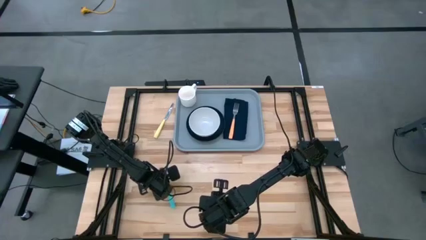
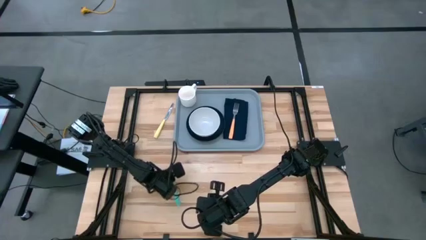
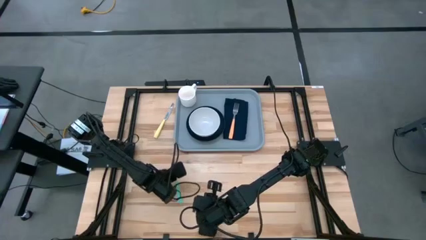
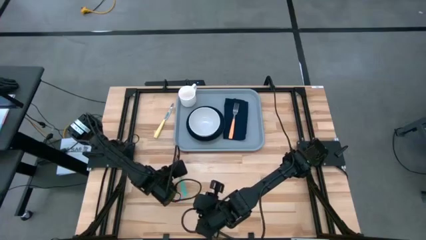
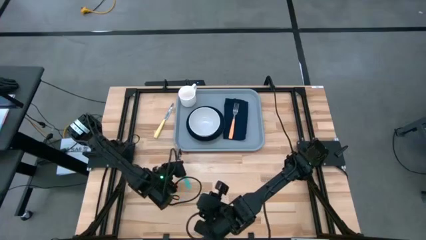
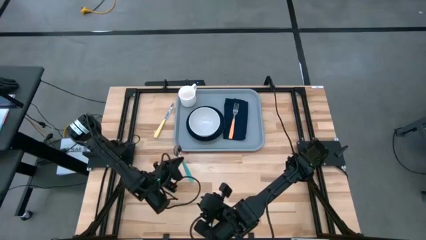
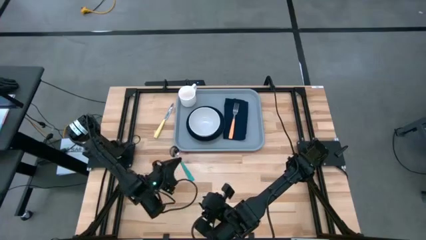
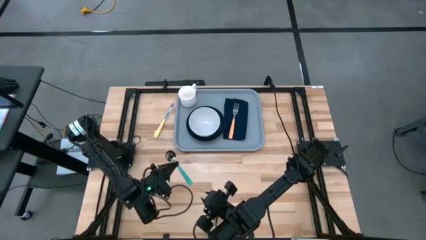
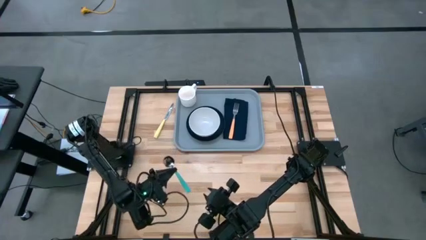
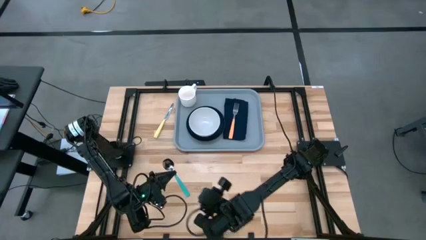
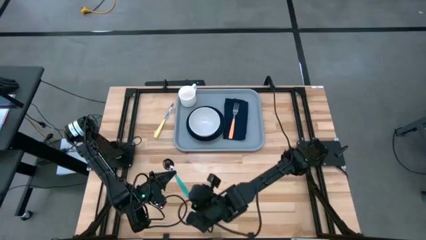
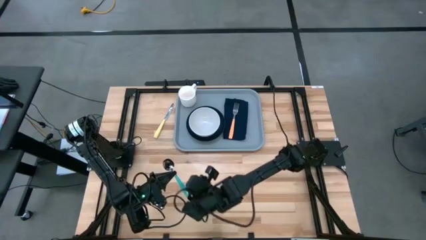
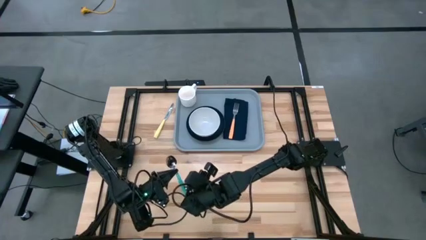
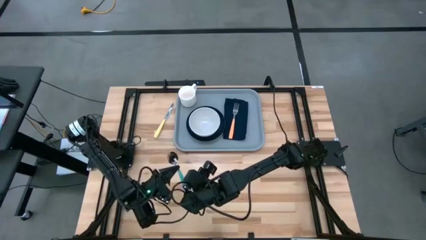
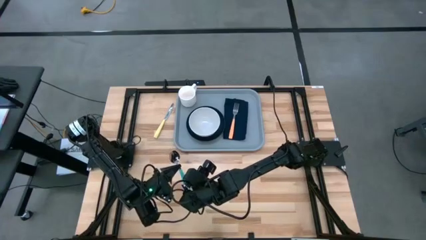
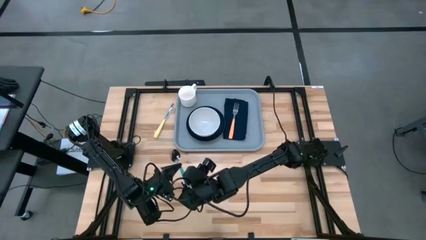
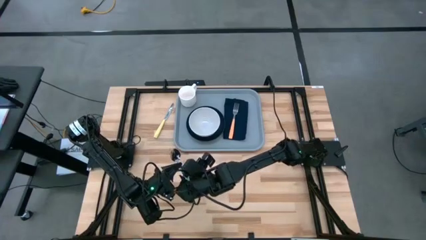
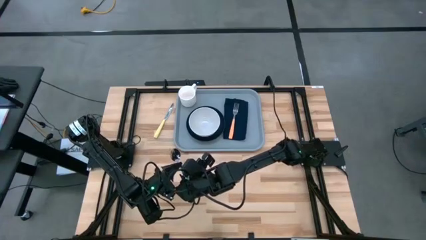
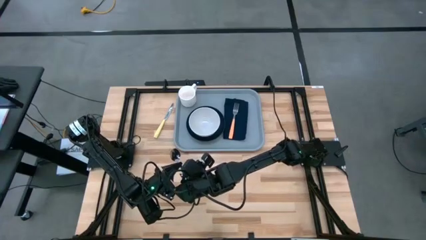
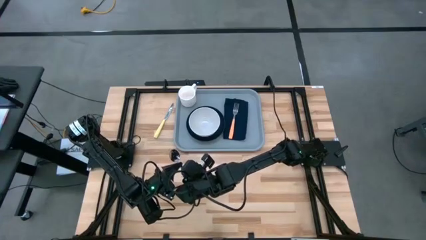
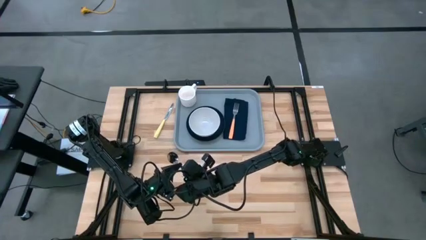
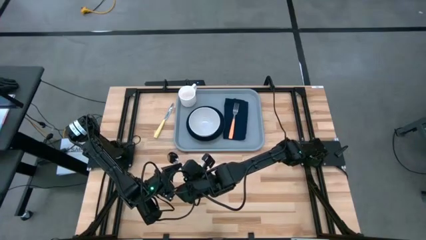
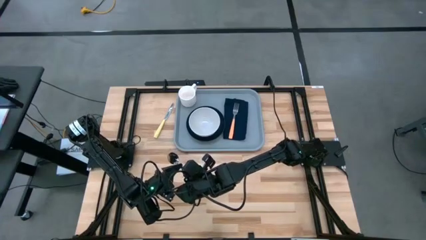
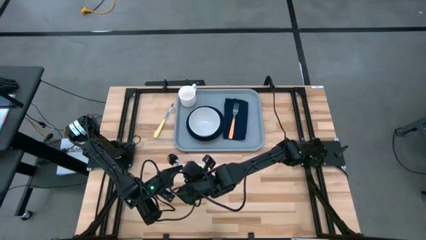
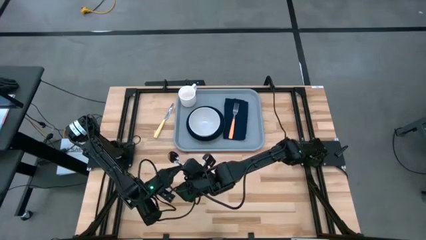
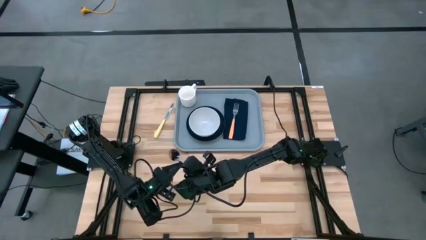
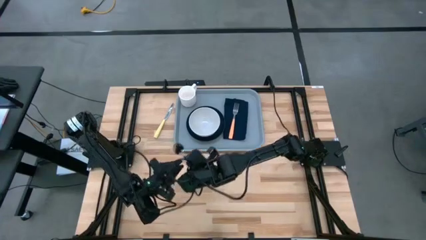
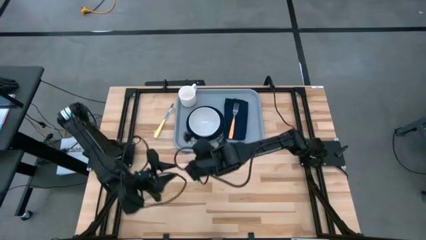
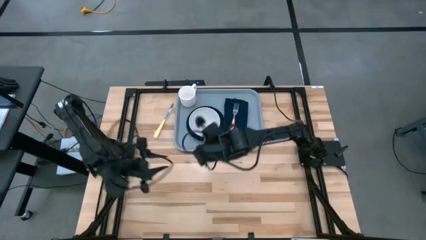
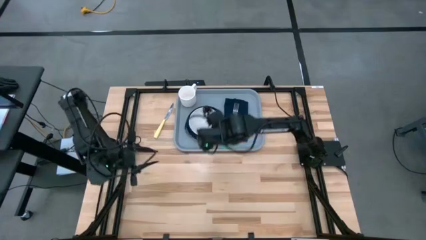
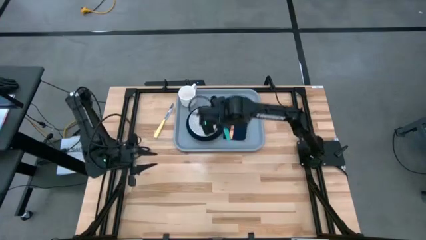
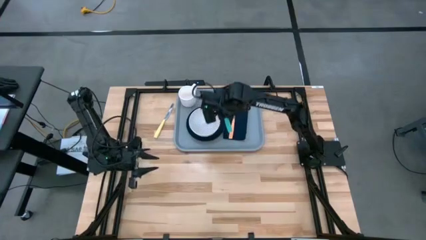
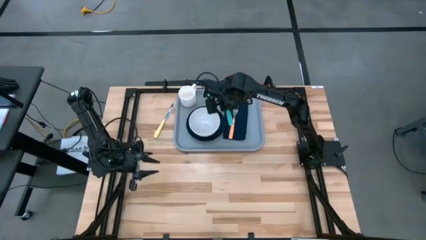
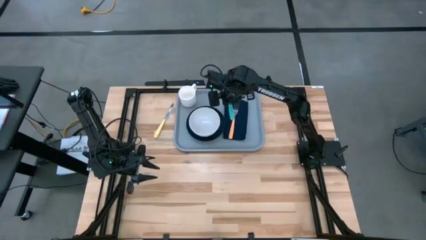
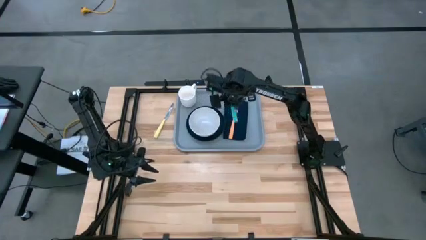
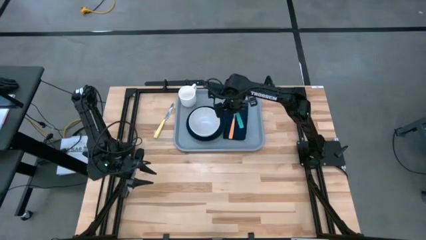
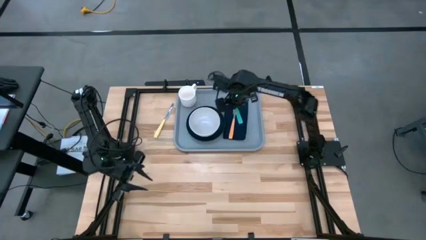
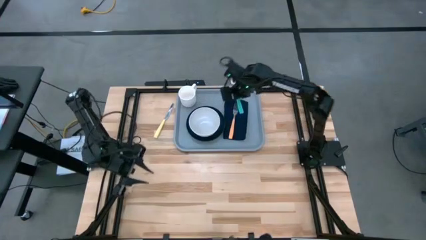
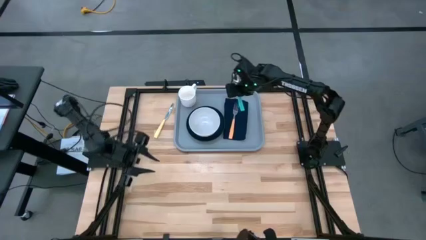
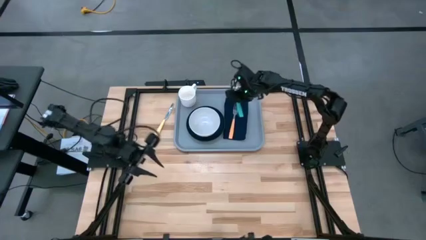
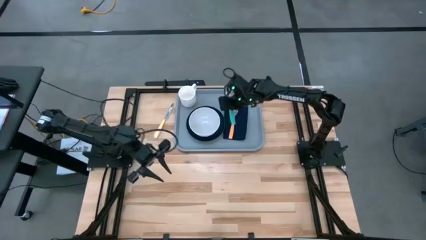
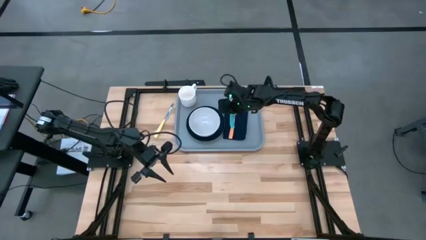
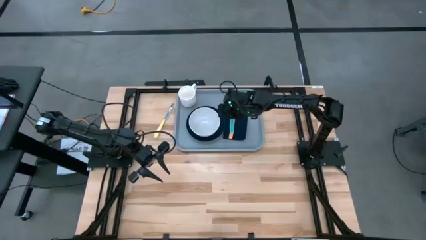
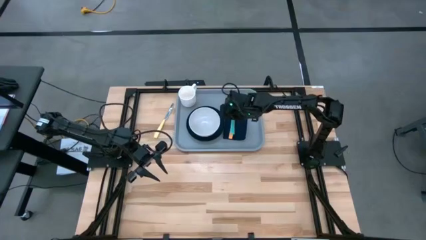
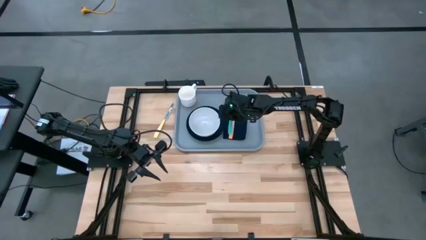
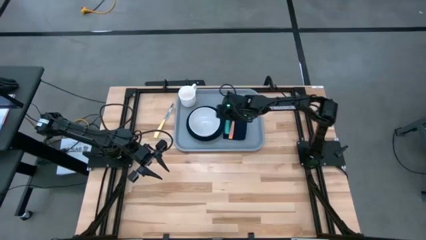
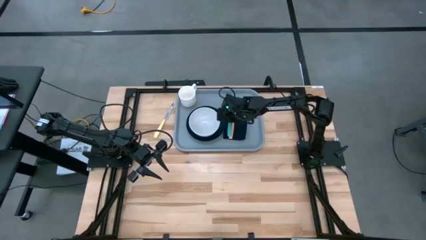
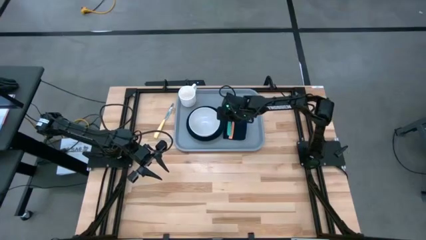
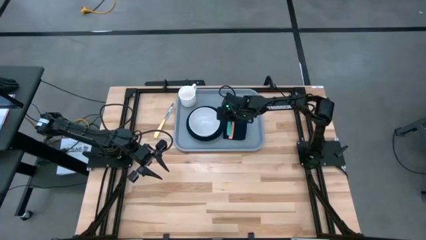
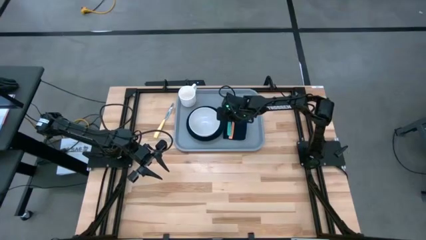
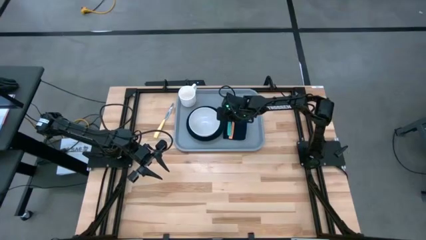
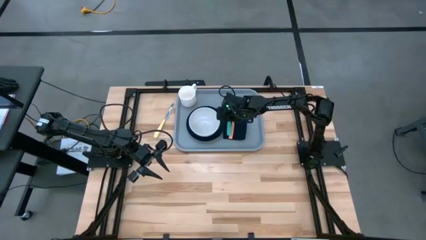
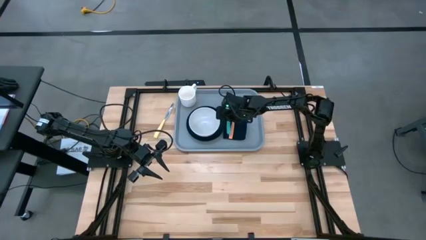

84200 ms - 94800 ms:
Task: Set up tray
Put the blue spoon to the left of the orange fork on the blue napkin on the gray tray

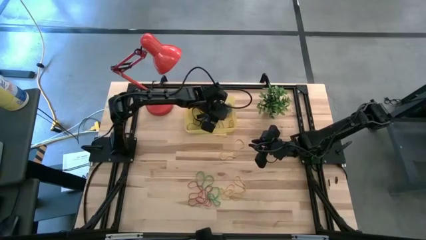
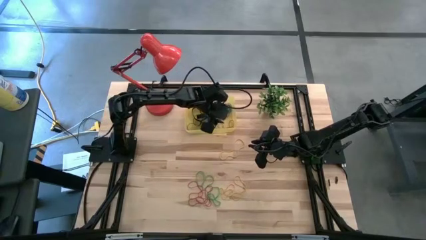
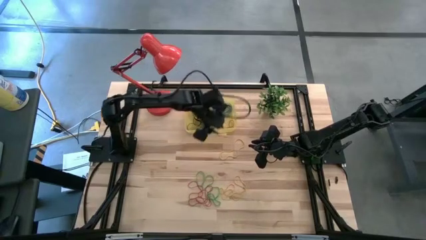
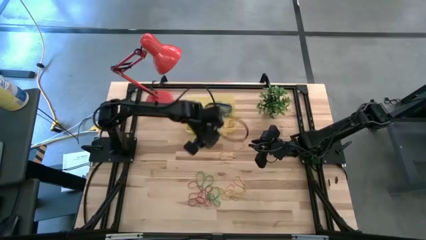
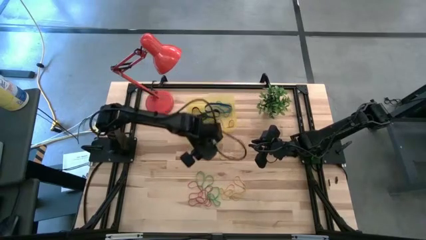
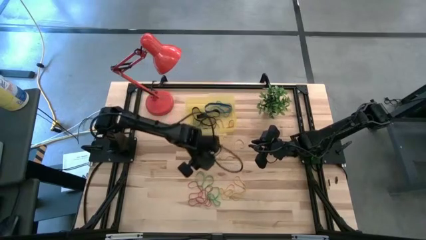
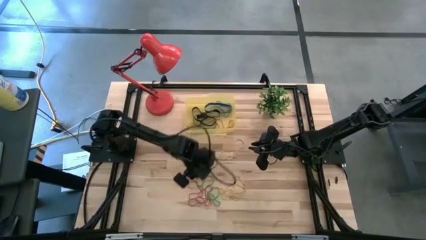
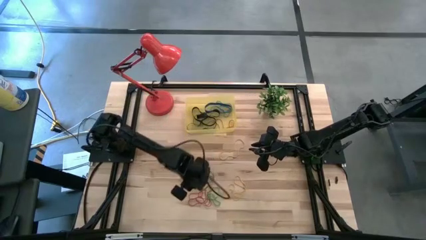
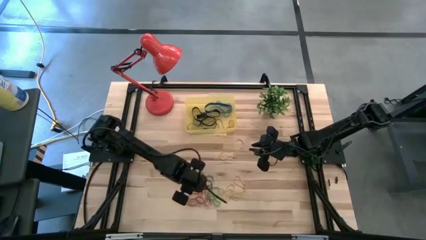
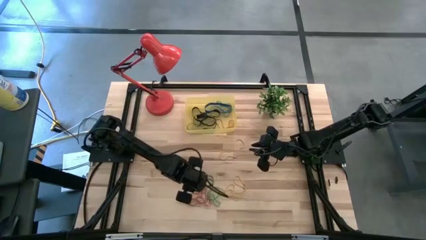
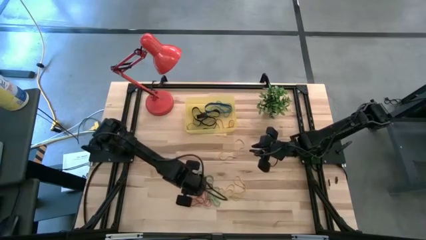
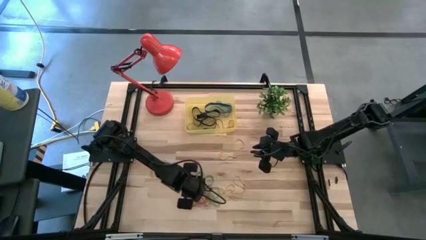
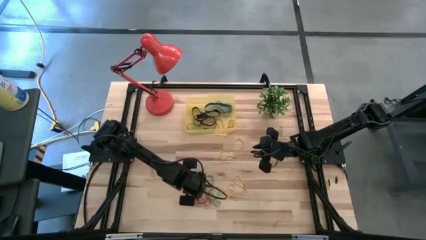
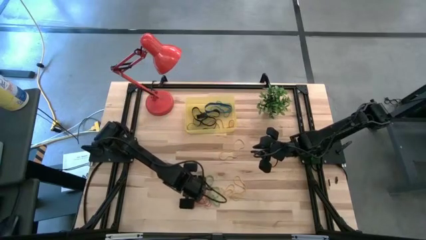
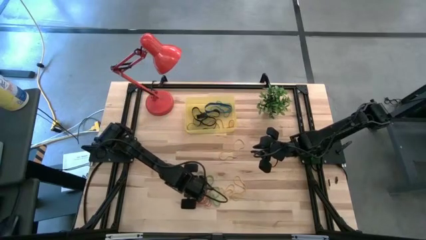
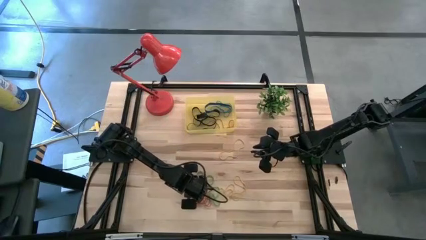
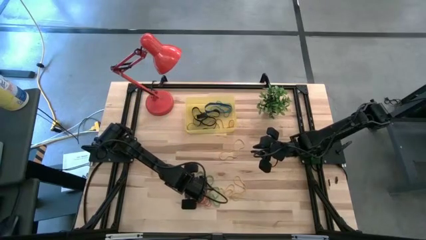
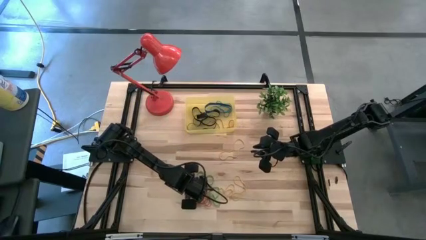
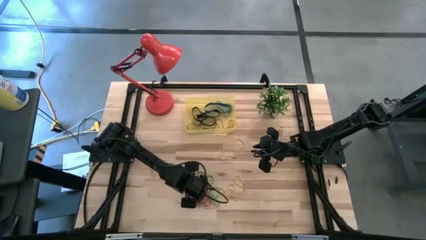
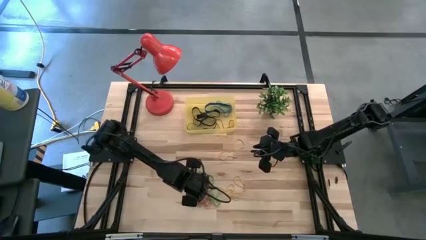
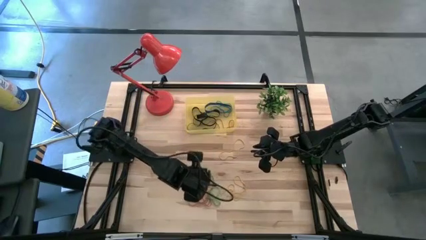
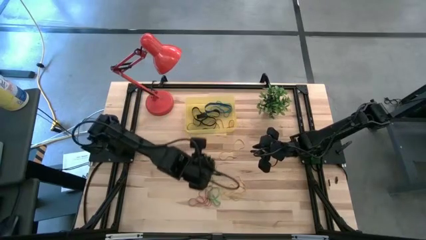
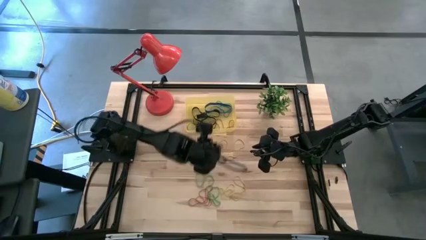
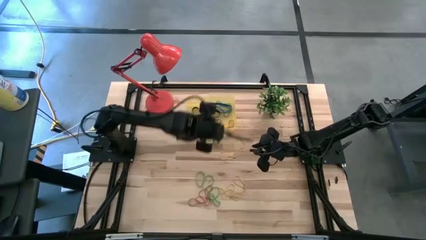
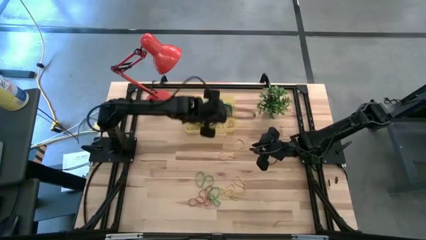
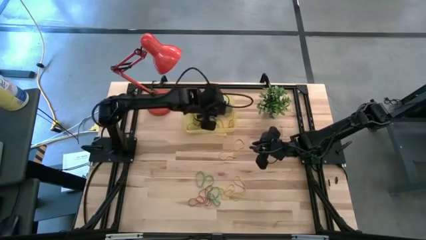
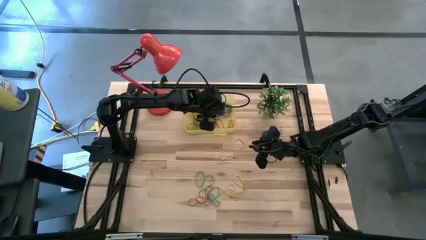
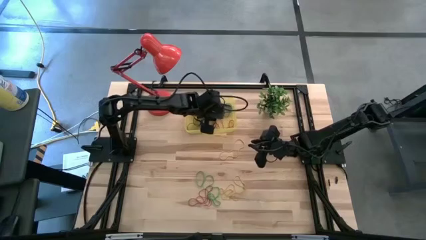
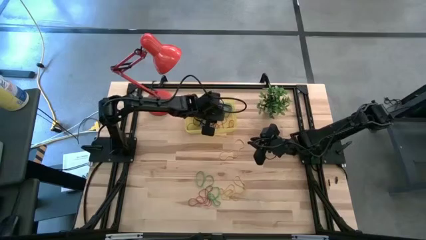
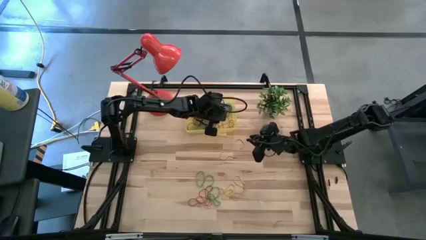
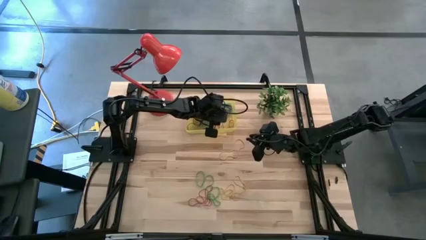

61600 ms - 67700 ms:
Task: Pick and place rubber bands into bin
Put the red rubber band into the yellow container
